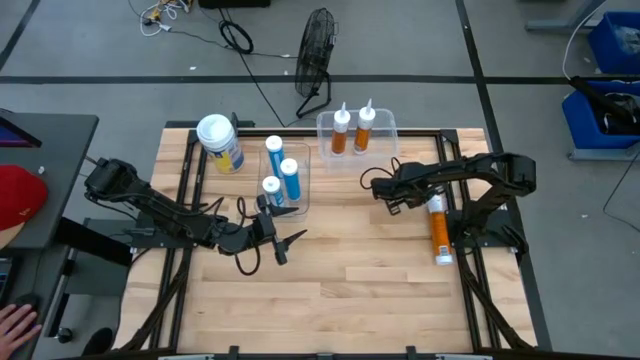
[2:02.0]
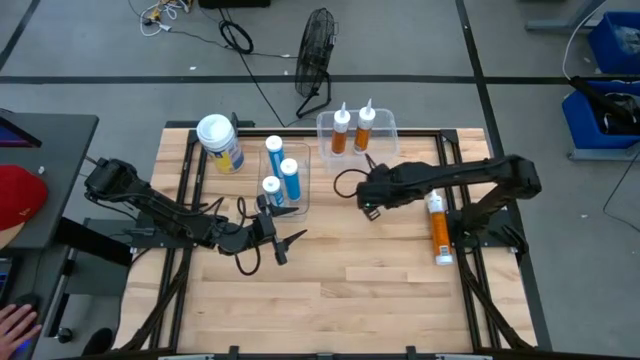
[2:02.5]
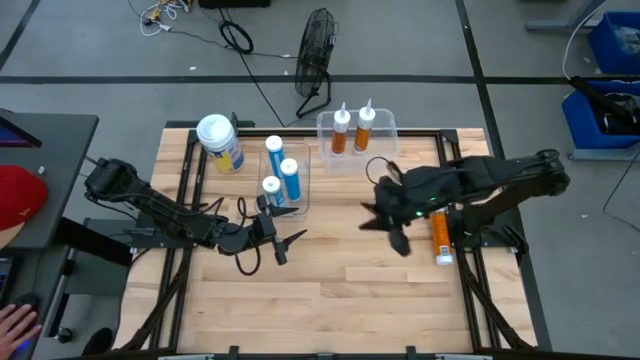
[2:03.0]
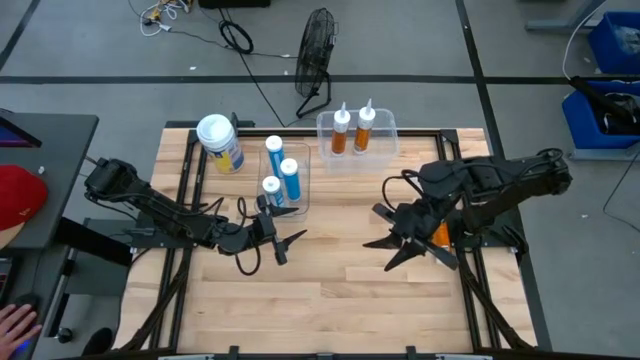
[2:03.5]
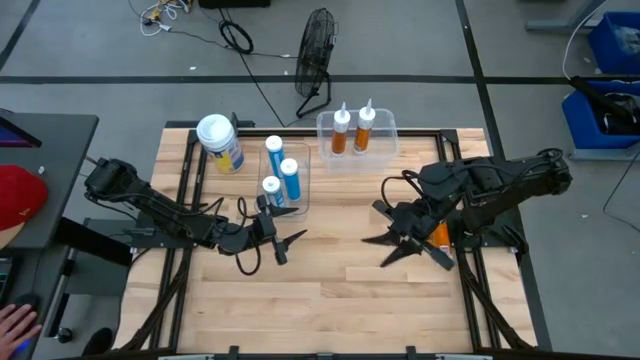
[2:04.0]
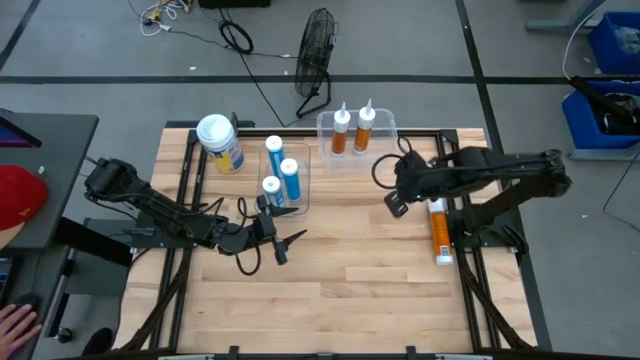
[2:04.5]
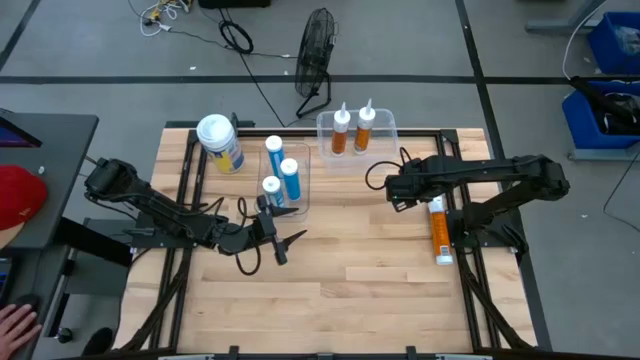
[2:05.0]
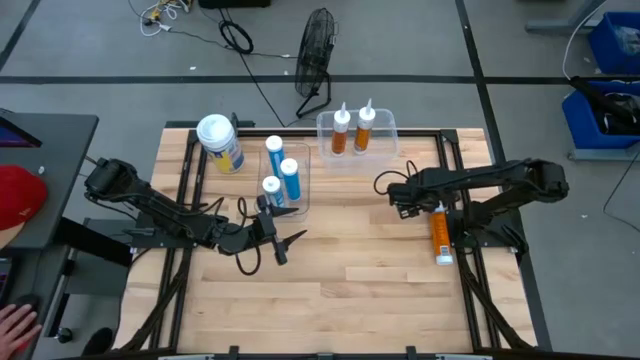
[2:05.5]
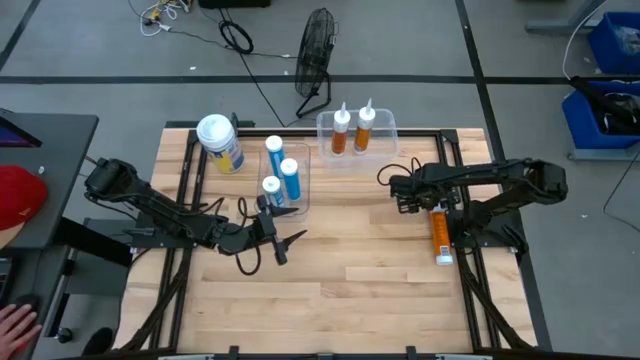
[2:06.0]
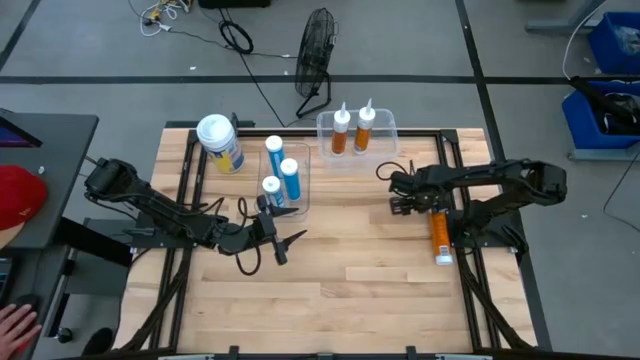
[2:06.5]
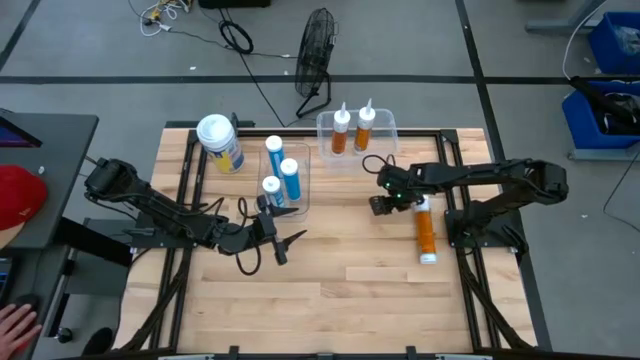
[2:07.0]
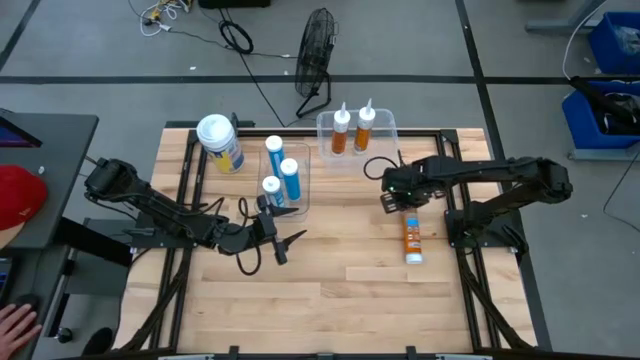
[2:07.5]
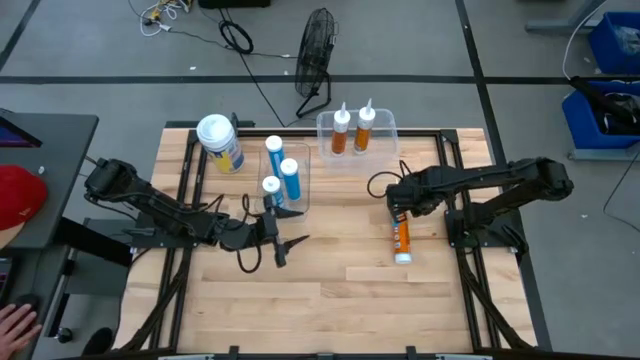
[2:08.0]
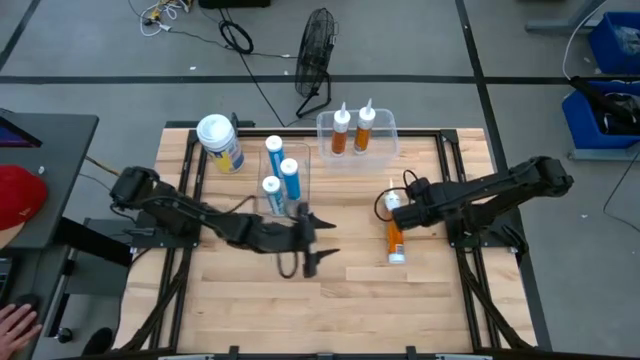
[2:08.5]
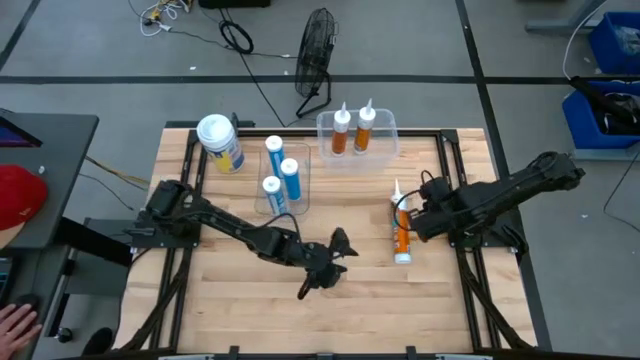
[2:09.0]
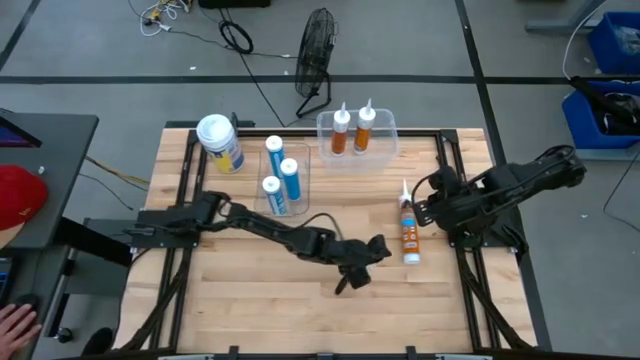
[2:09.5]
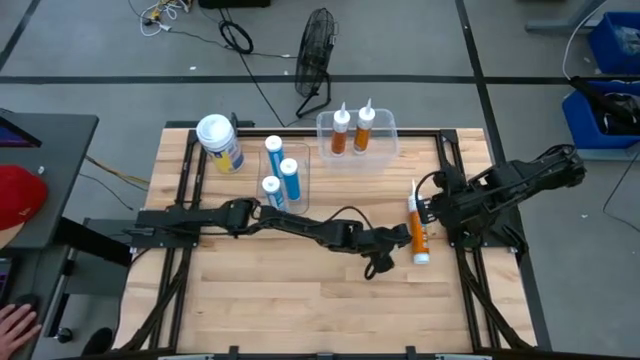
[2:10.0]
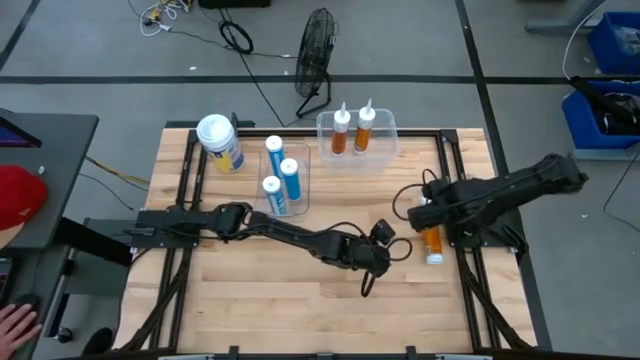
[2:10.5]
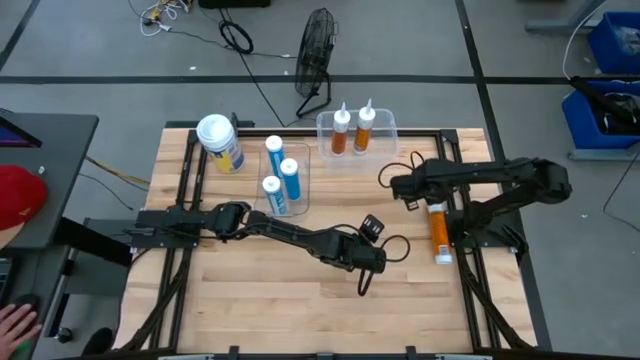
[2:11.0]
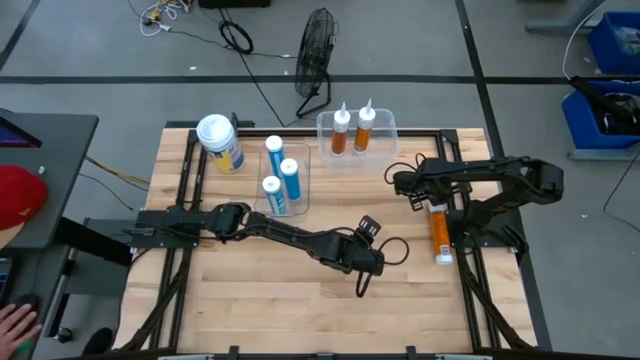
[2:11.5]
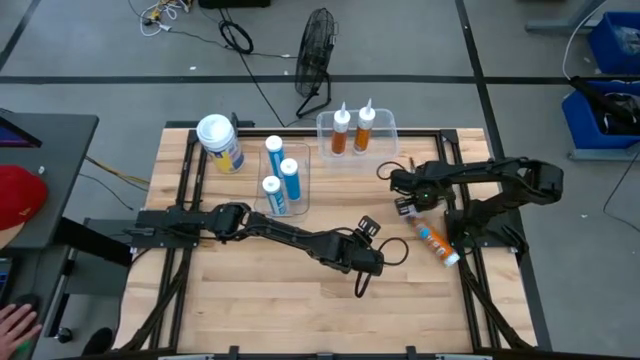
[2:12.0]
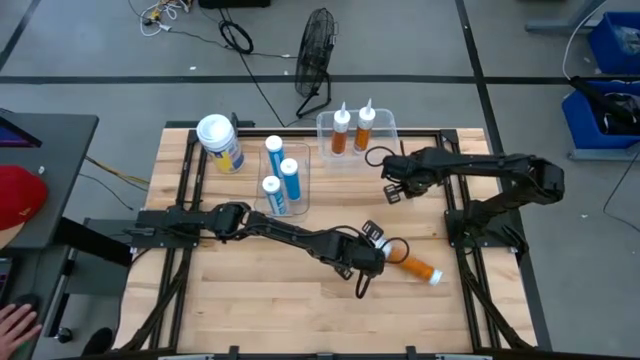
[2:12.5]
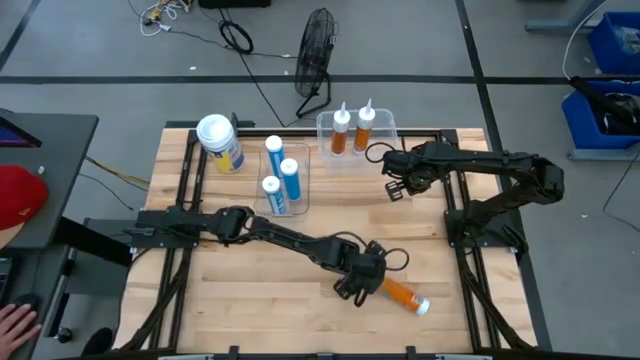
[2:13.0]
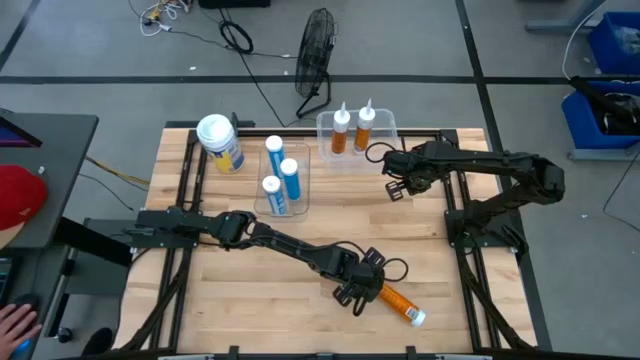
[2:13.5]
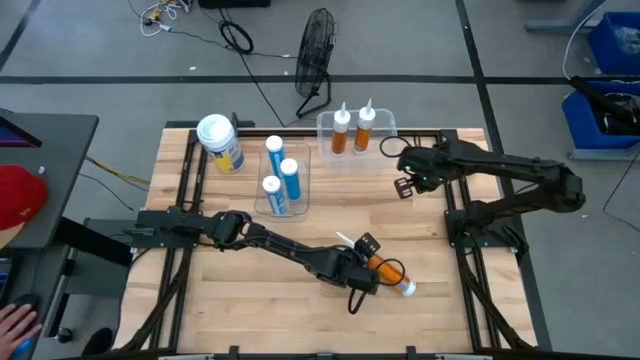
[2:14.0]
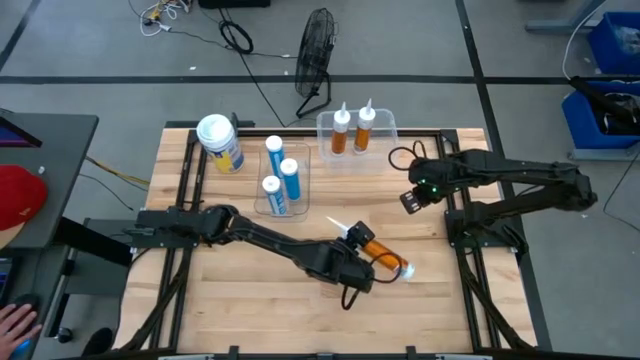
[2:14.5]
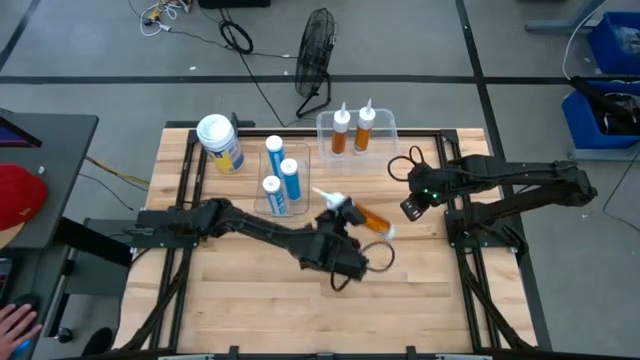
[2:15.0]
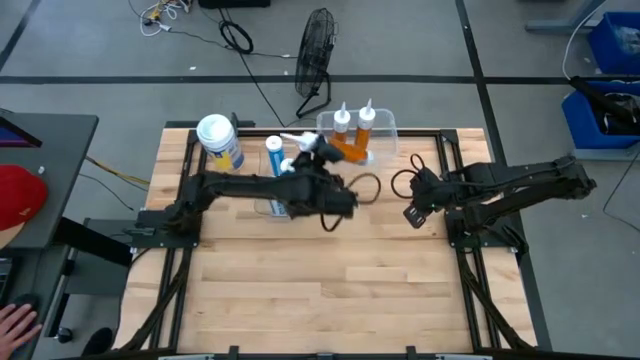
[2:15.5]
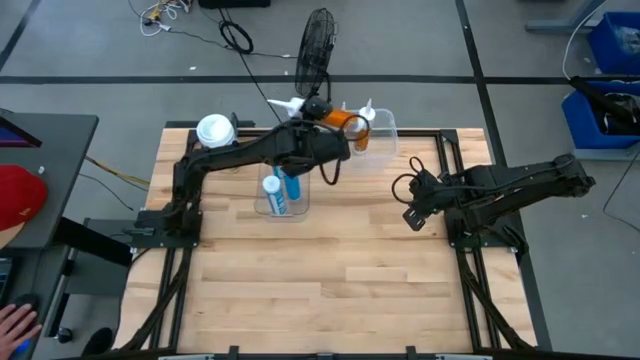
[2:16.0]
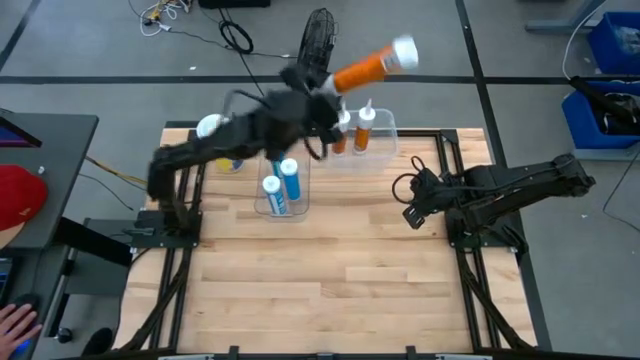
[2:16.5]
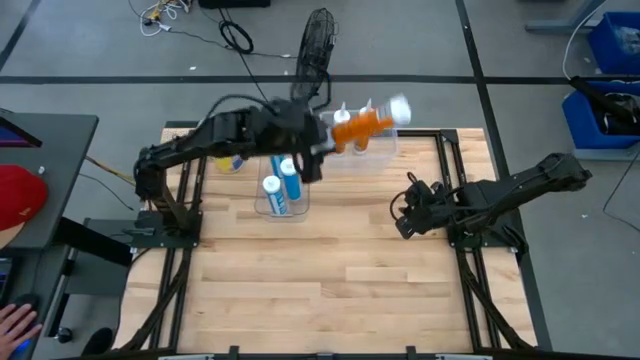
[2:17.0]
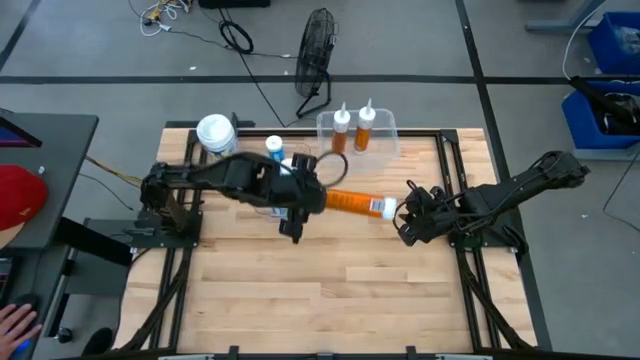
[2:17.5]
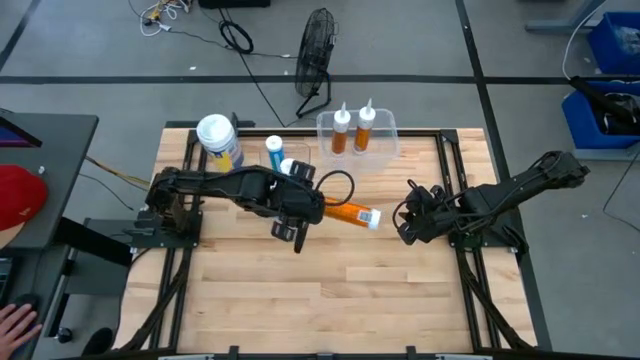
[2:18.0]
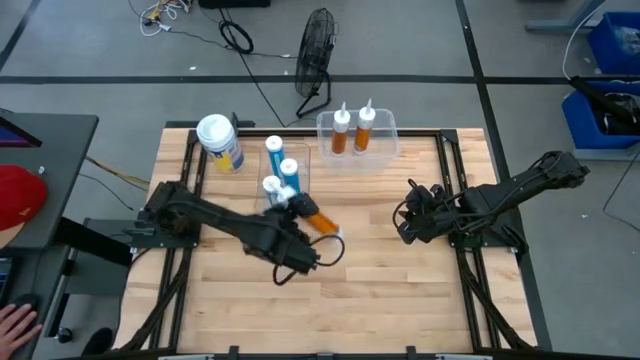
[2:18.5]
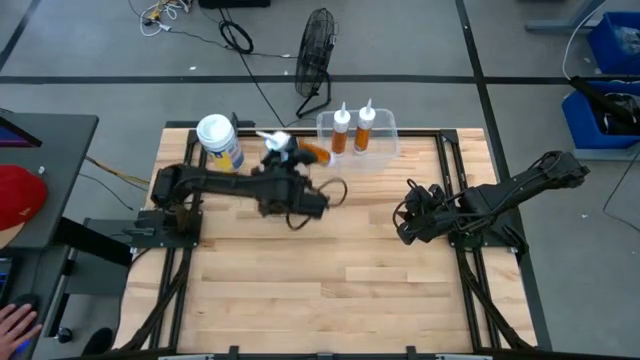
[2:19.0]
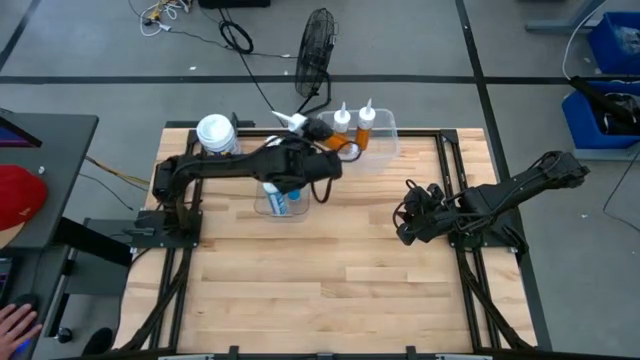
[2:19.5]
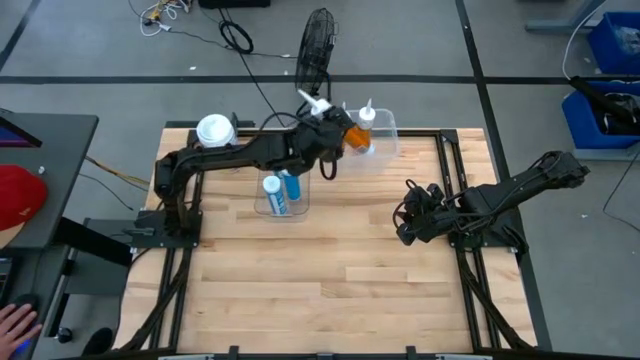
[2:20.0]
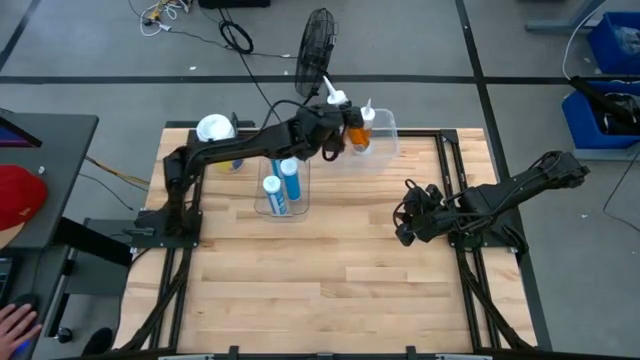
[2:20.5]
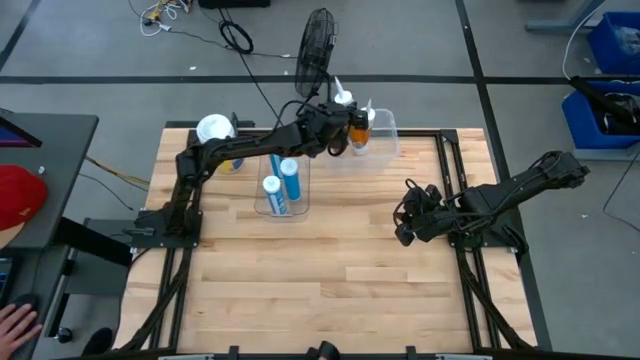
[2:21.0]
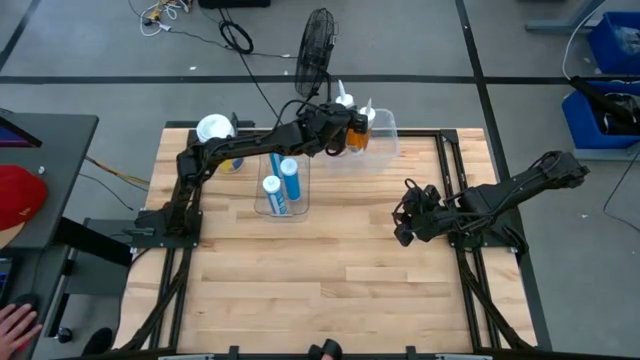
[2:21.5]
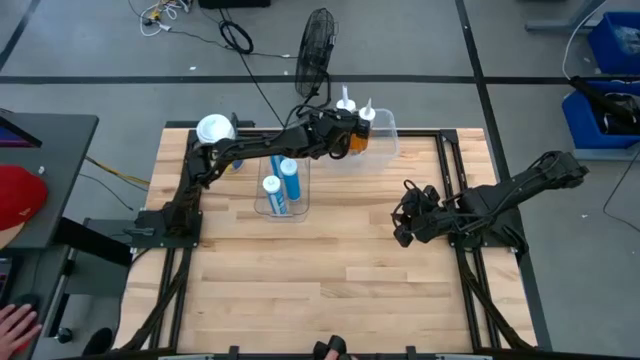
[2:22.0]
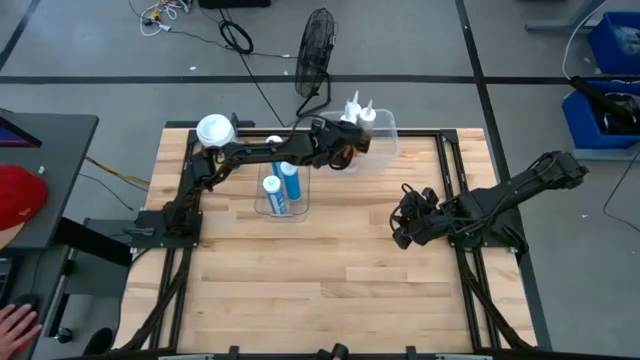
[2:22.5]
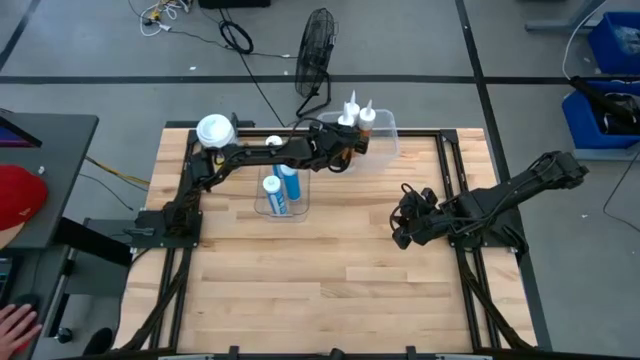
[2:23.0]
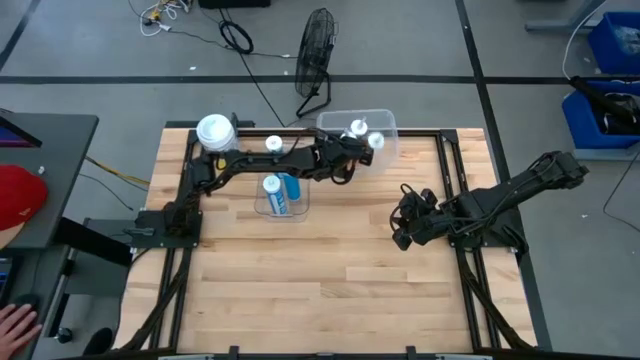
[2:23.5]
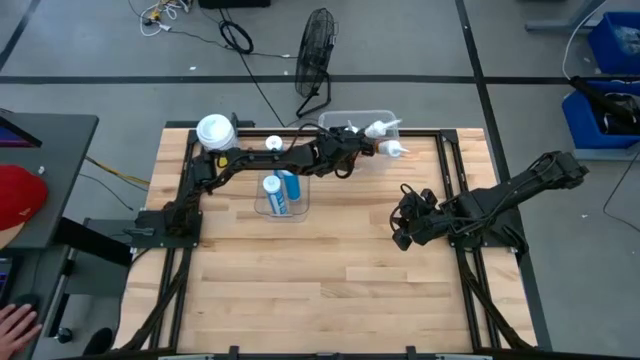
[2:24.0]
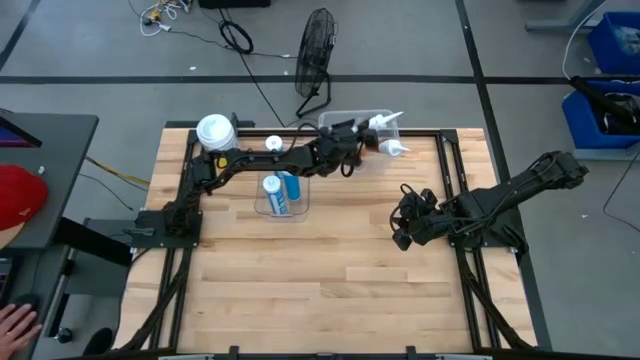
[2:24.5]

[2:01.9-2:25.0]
Task: Pick & place silicon tubes, Sealant and Lysol wipes
Put the orange sealant into the right transparent bin
